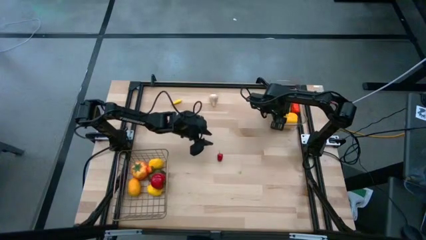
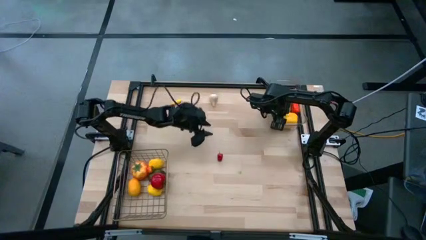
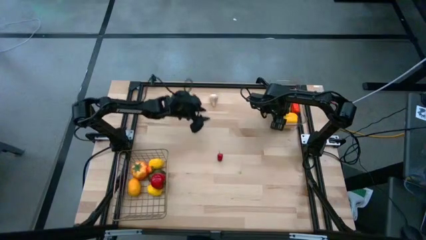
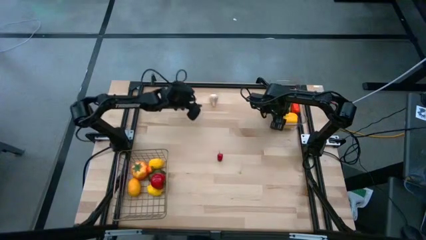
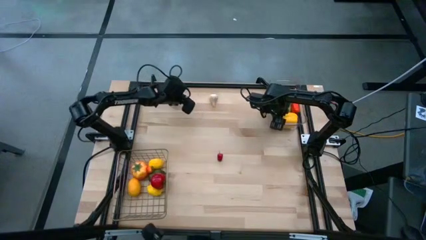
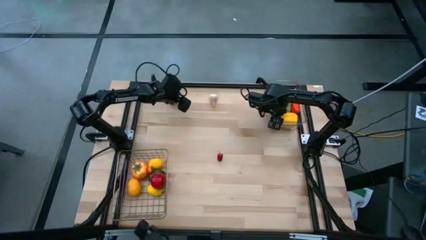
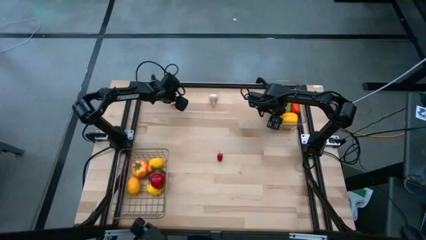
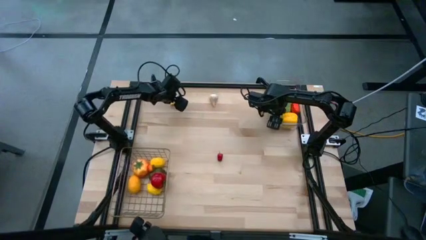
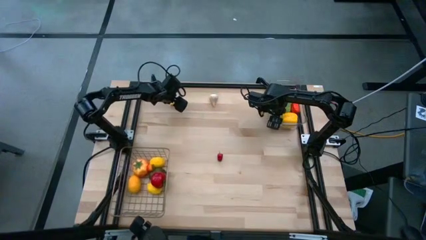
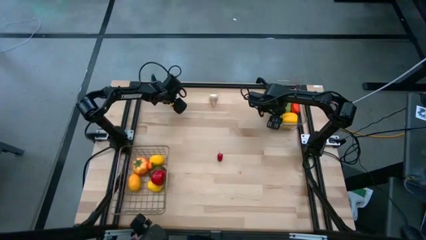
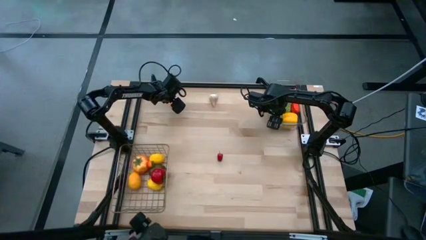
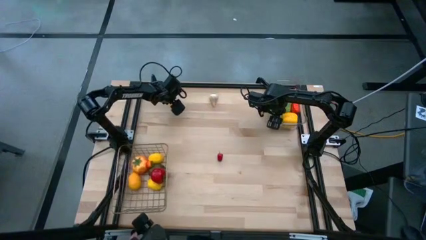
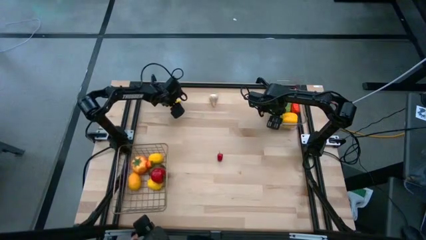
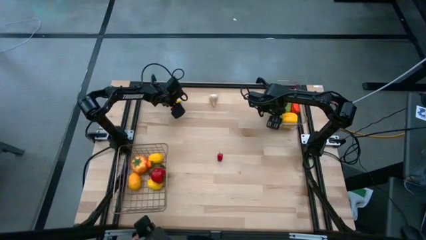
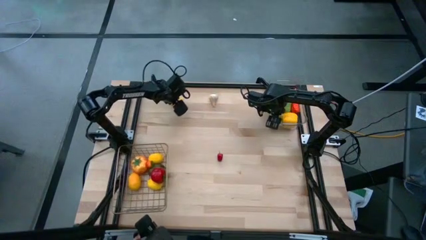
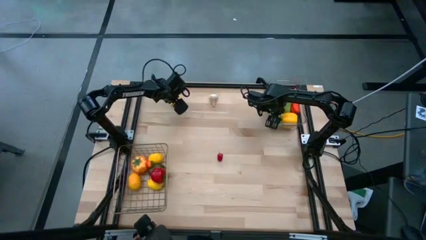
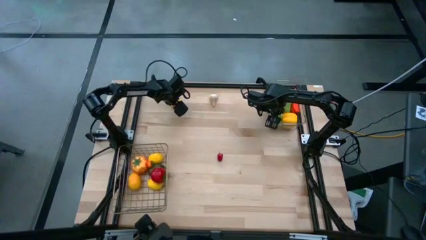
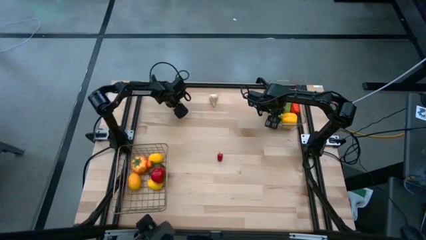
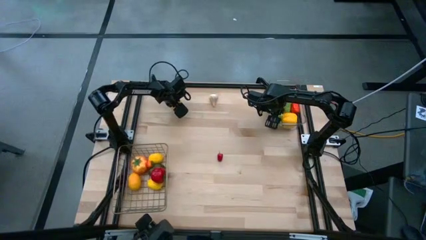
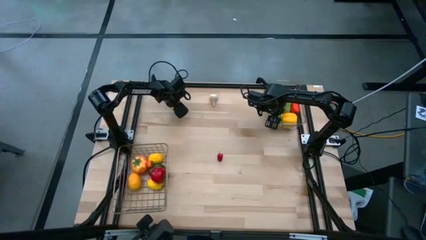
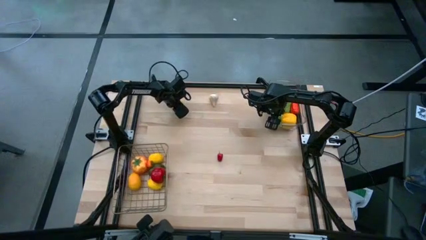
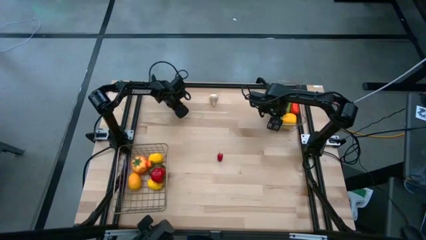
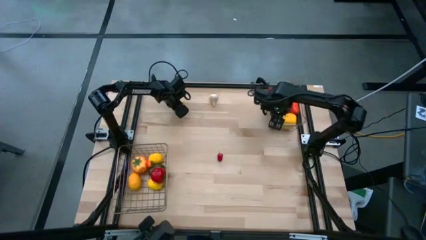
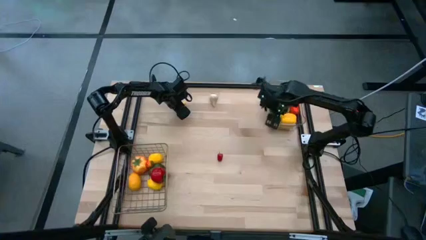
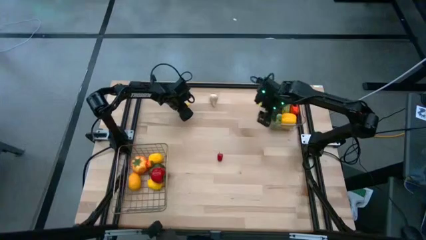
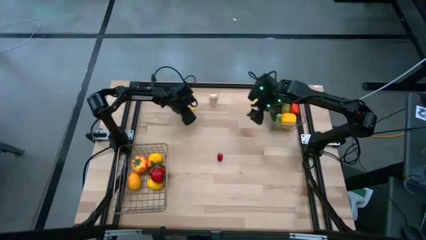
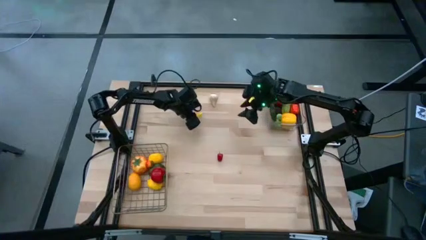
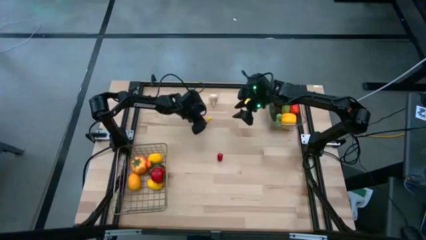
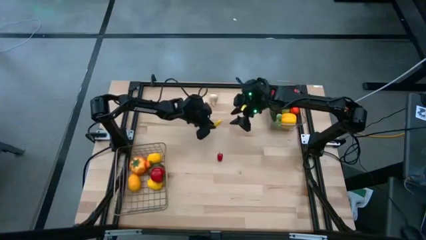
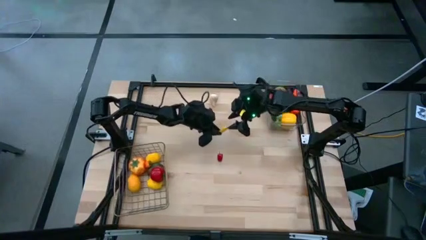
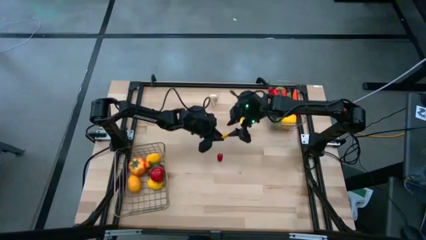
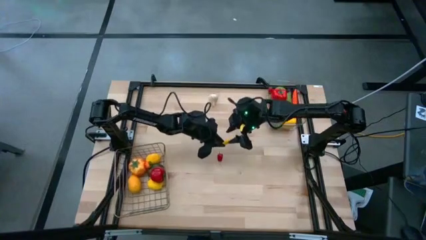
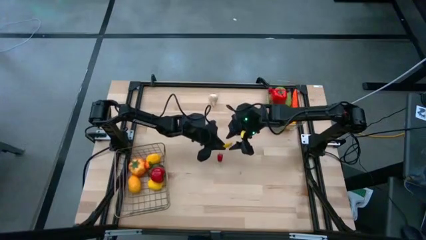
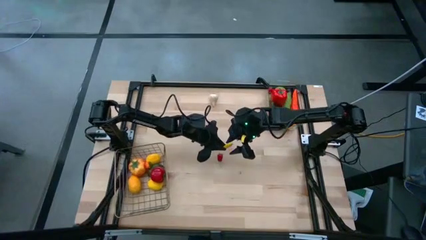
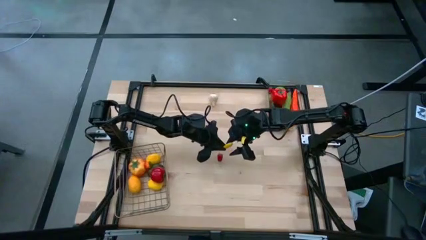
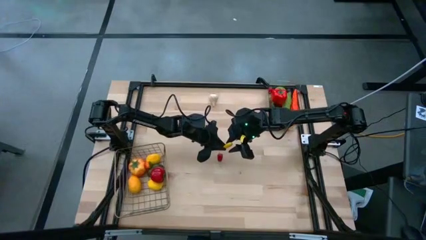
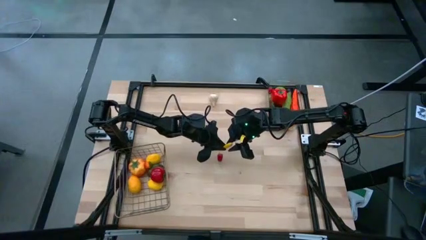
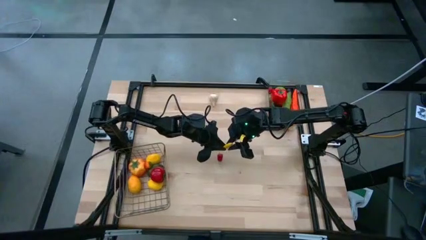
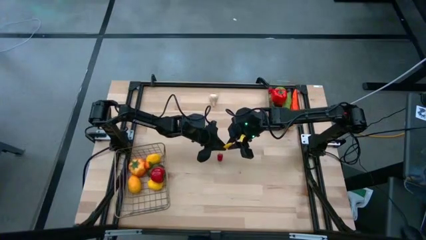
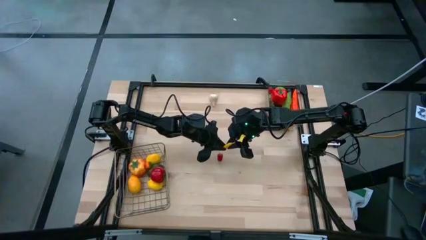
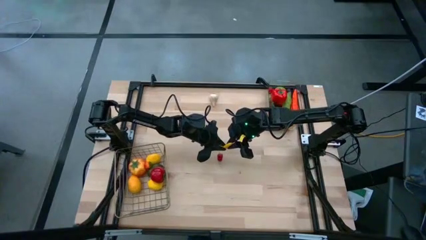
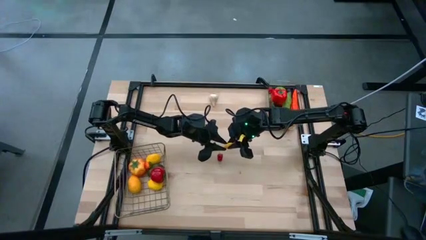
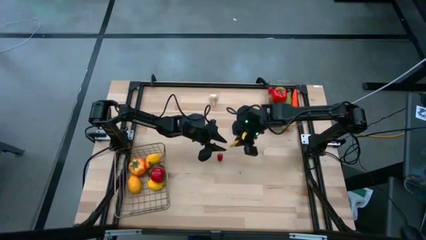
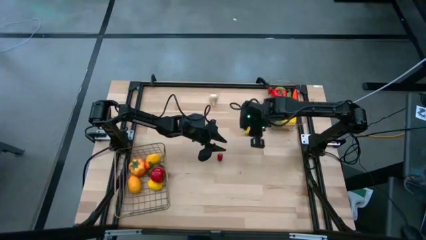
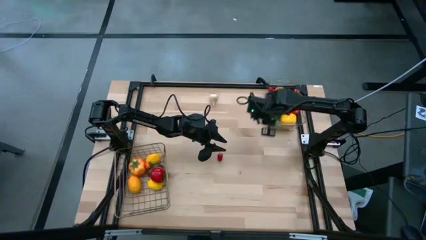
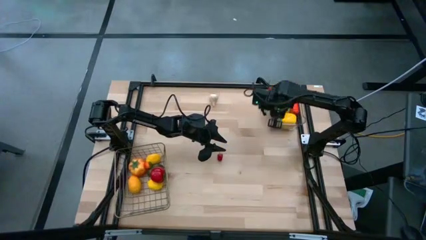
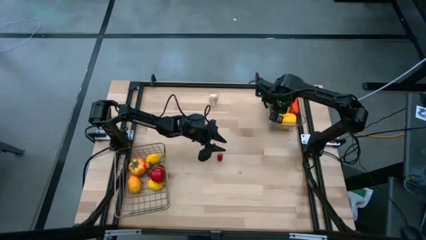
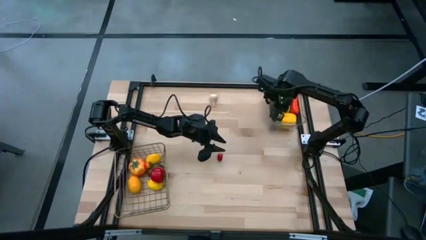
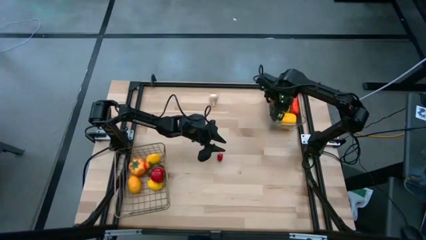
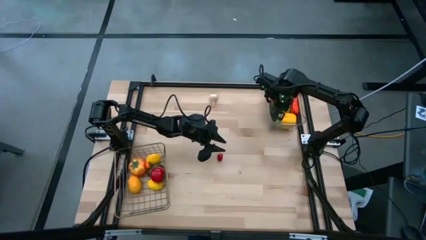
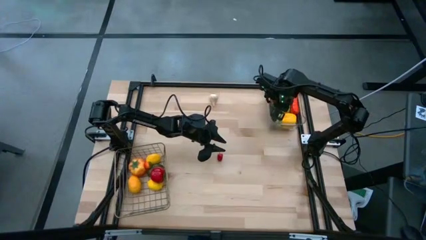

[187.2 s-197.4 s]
Task: Sort produce into baskets
Put the yellow corn into the transparent bin

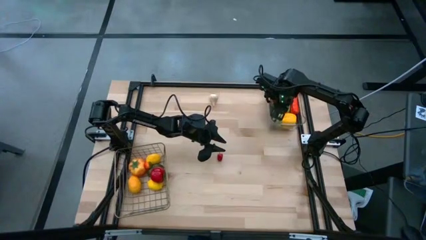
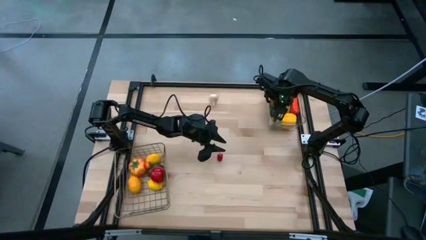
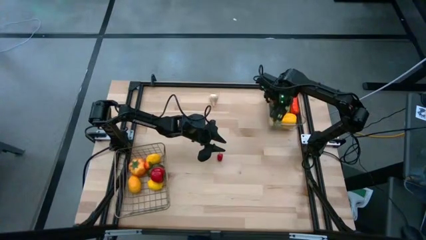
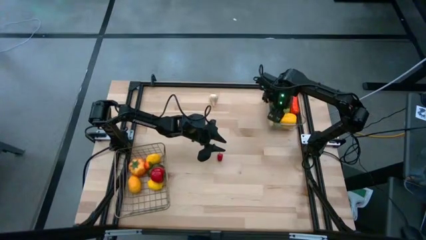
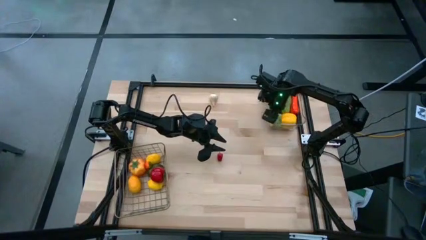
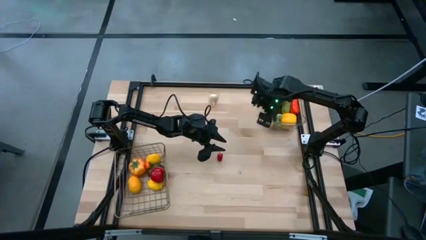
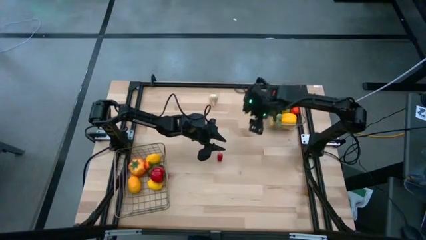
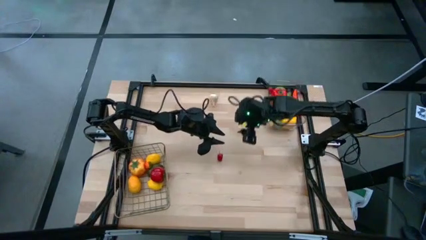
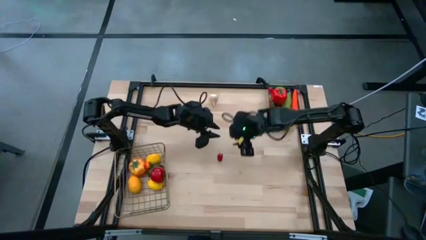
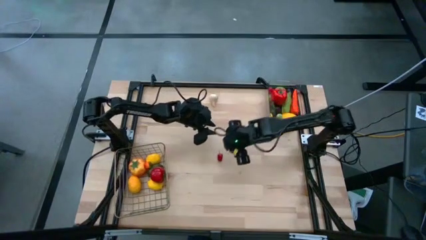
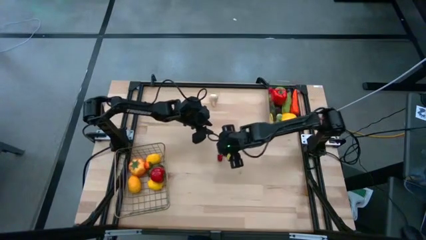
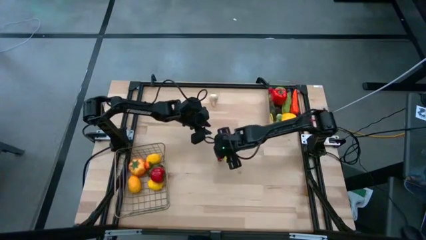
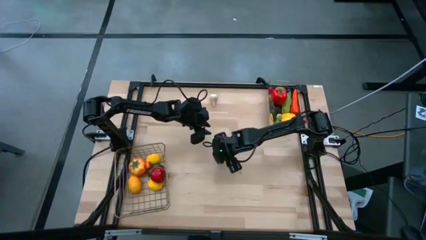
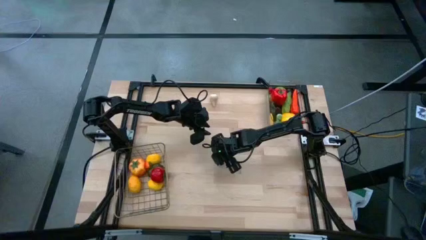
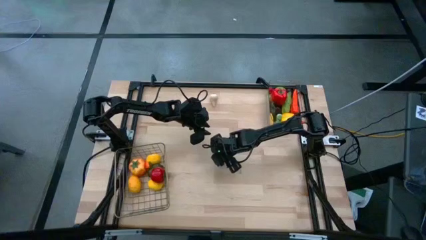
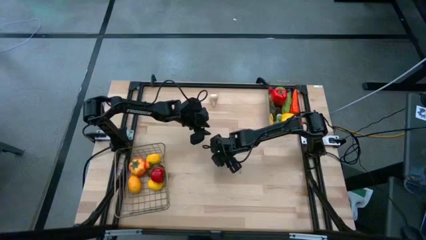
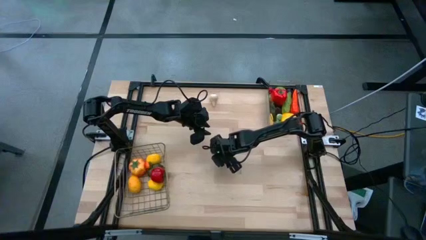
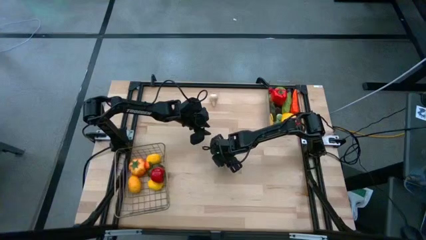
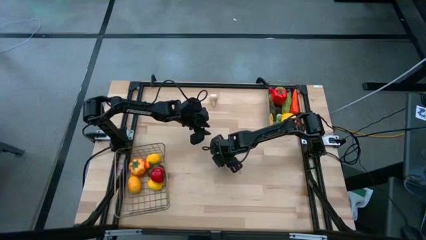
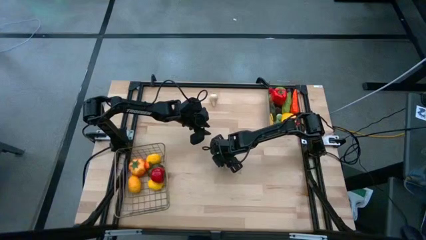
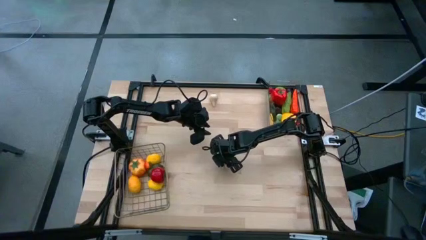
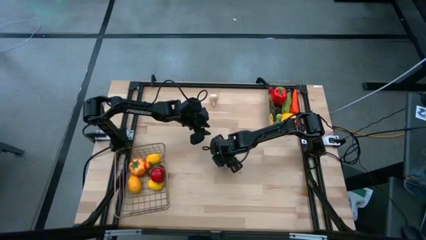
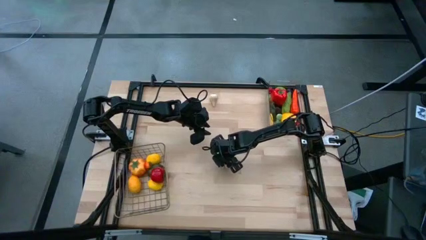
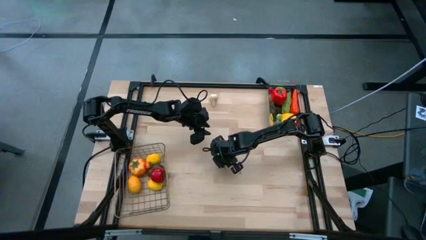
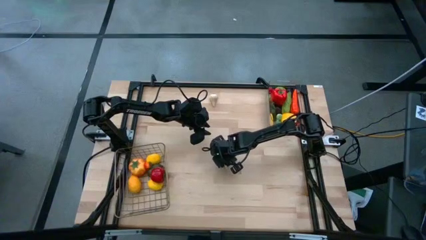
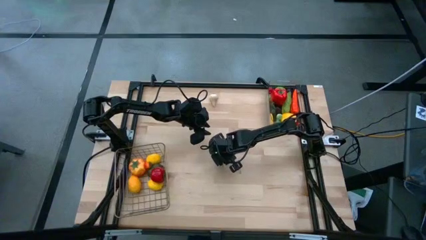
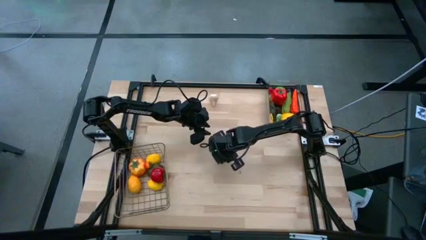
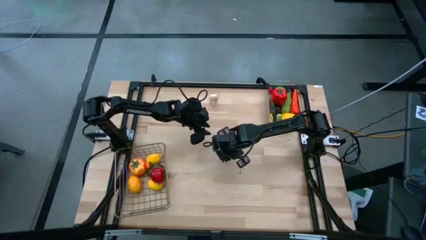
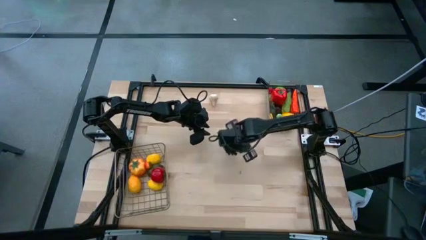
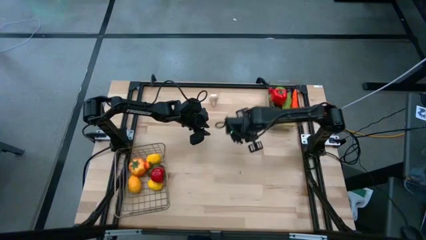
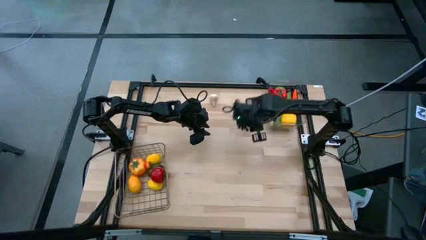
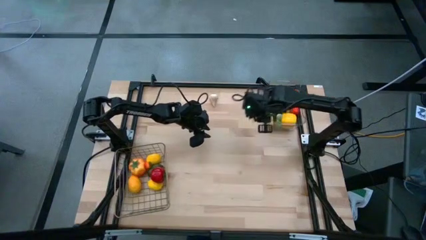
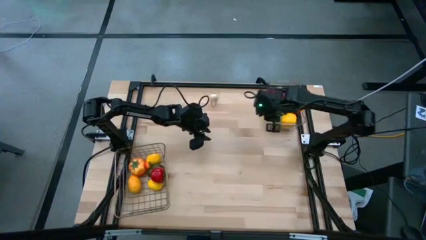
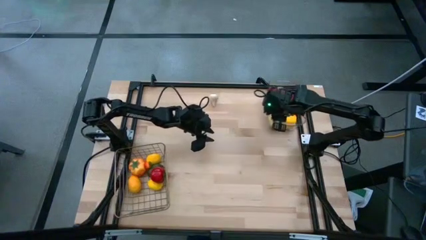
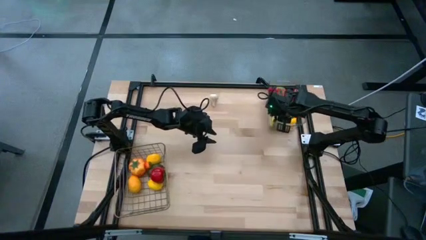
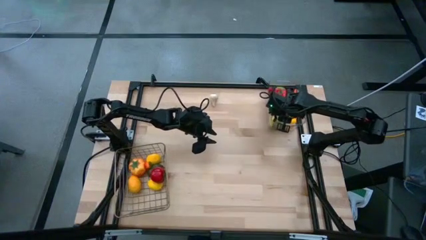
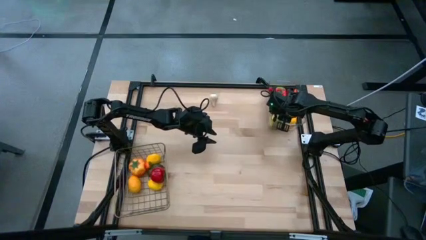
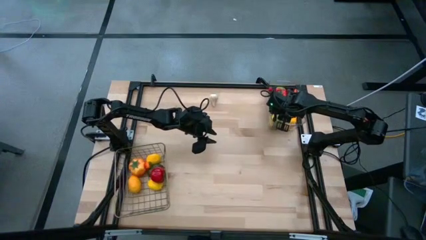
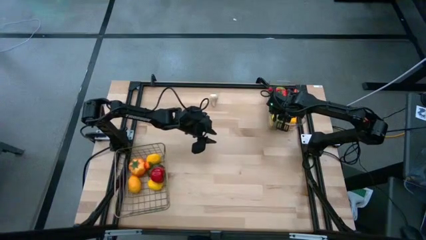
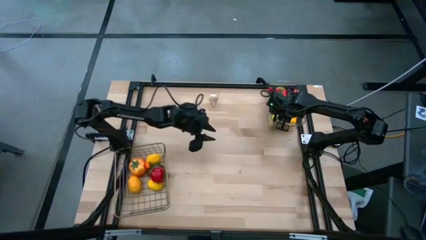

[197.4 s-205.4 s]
Put the red chili pepper into the transparent bin
